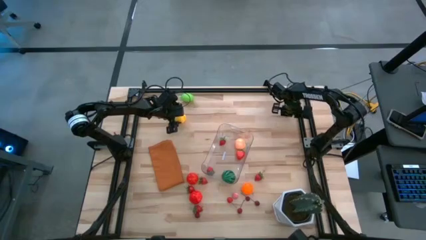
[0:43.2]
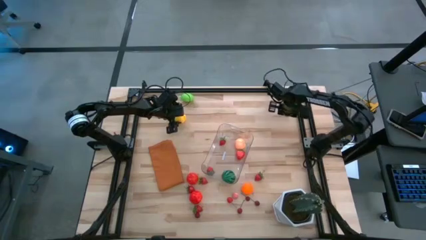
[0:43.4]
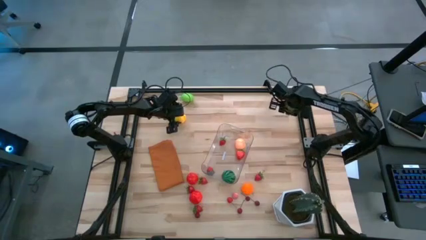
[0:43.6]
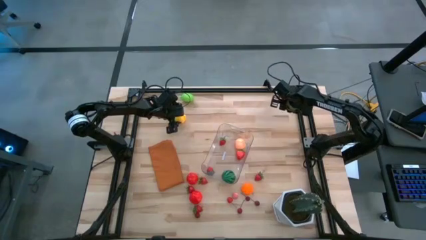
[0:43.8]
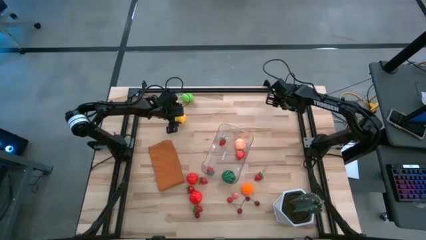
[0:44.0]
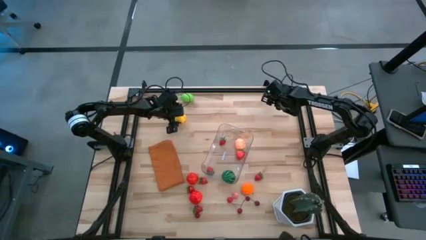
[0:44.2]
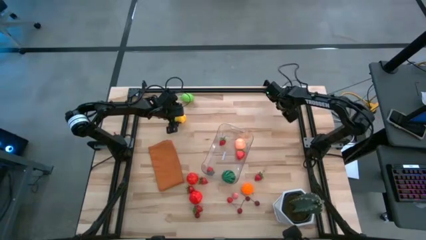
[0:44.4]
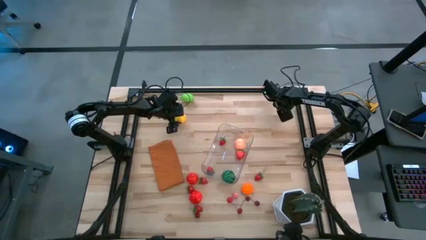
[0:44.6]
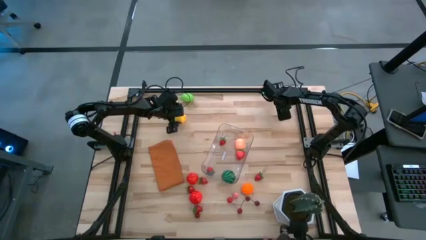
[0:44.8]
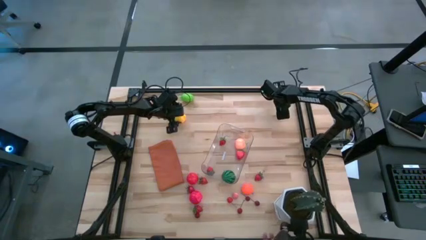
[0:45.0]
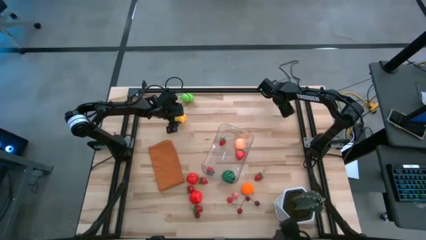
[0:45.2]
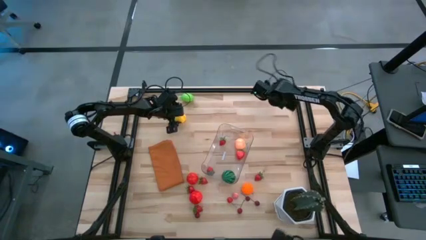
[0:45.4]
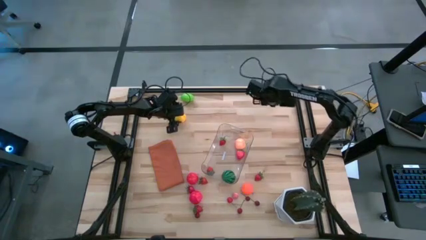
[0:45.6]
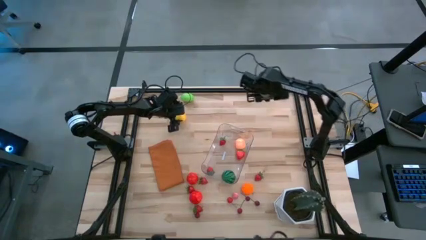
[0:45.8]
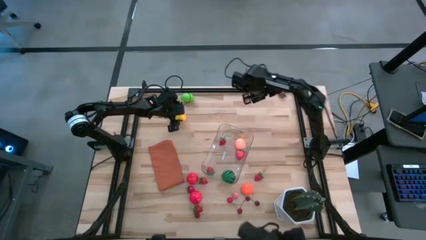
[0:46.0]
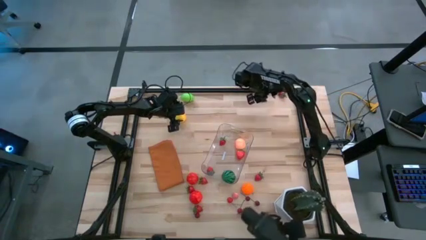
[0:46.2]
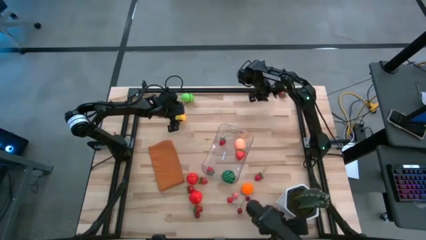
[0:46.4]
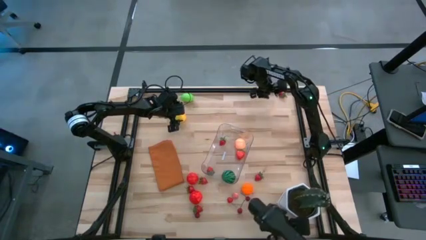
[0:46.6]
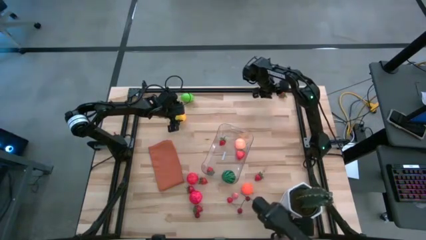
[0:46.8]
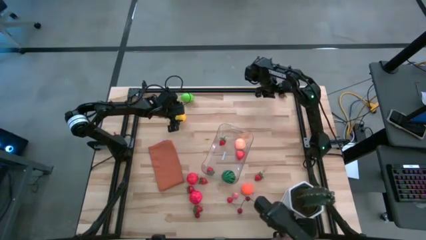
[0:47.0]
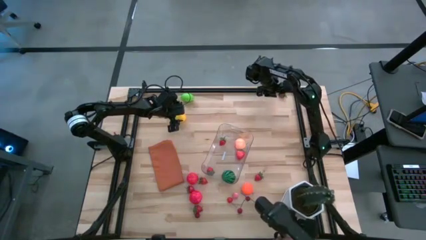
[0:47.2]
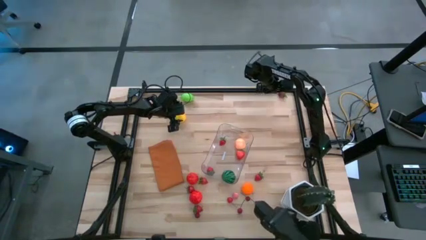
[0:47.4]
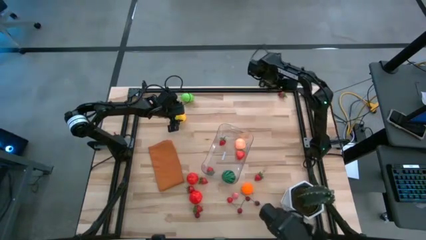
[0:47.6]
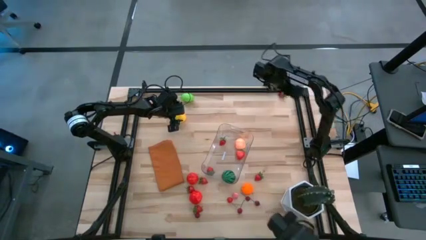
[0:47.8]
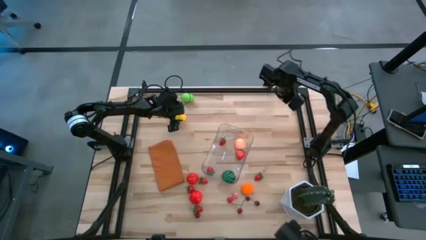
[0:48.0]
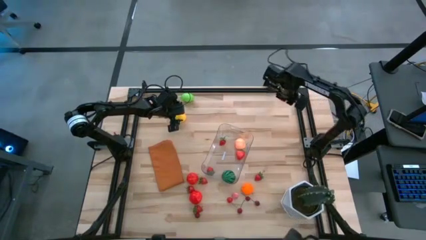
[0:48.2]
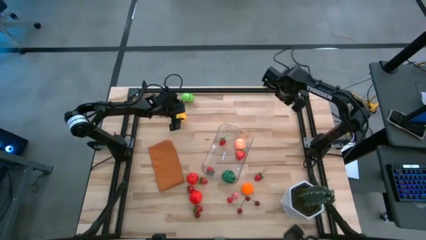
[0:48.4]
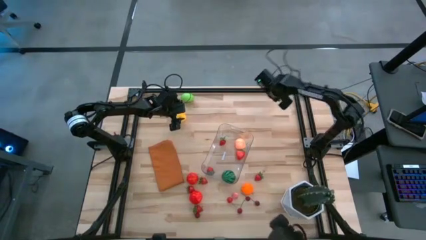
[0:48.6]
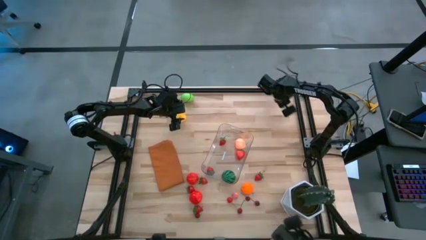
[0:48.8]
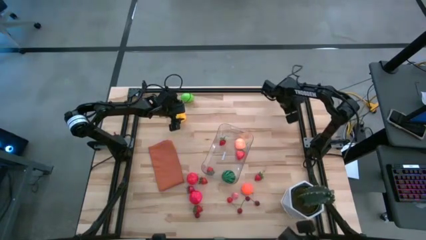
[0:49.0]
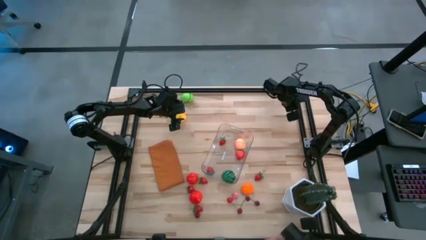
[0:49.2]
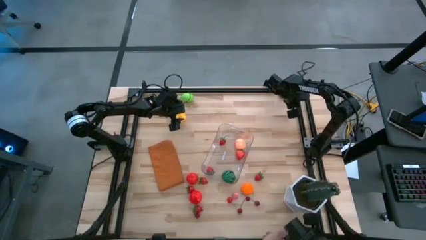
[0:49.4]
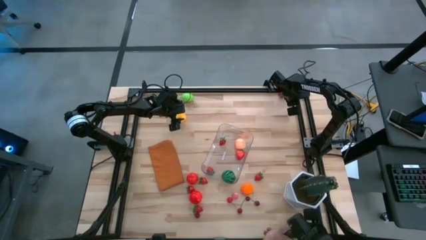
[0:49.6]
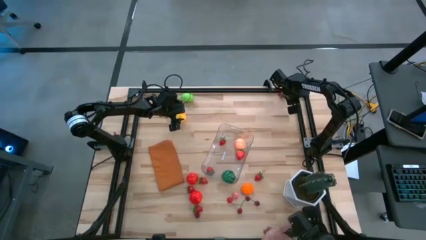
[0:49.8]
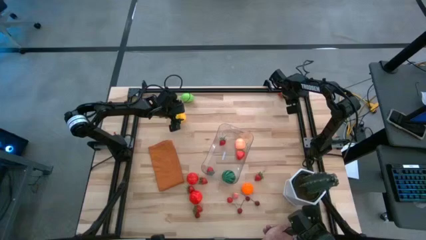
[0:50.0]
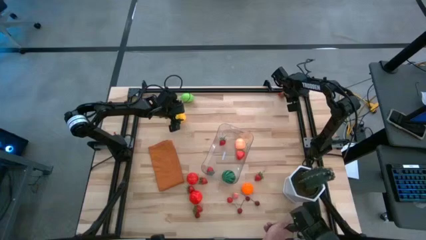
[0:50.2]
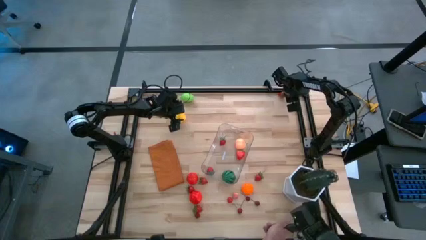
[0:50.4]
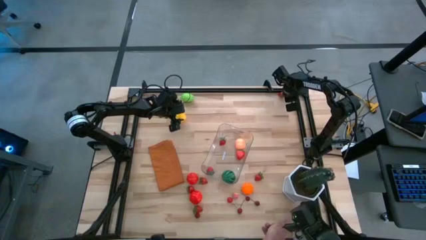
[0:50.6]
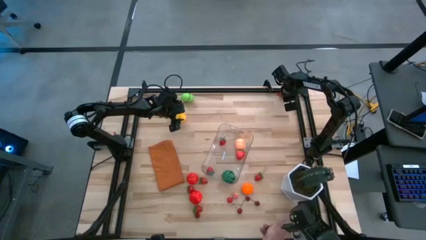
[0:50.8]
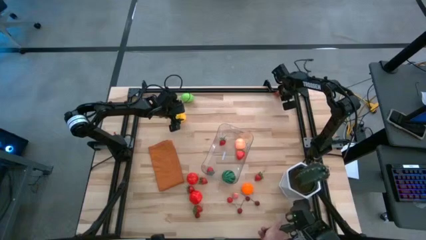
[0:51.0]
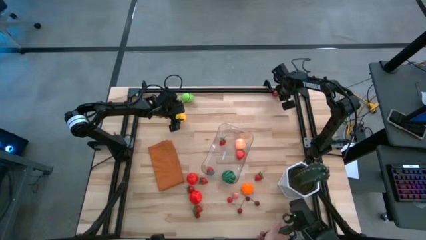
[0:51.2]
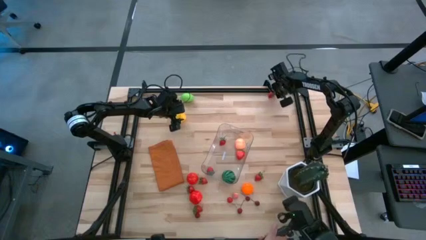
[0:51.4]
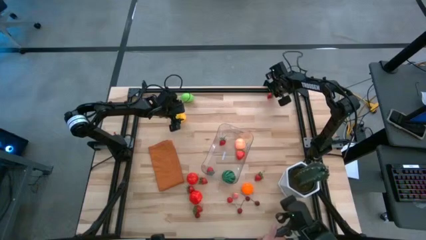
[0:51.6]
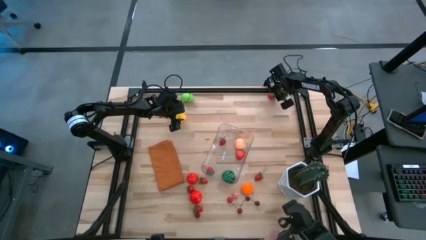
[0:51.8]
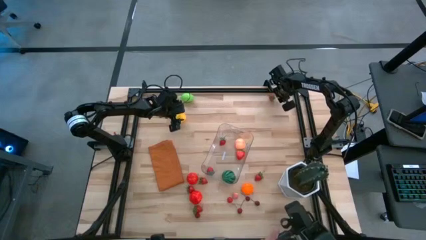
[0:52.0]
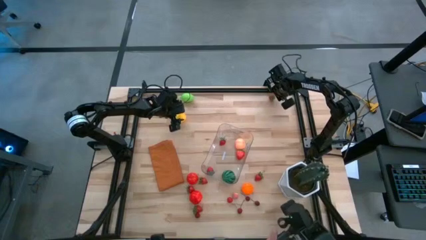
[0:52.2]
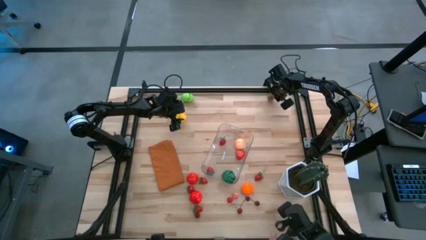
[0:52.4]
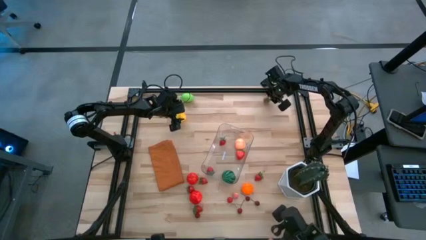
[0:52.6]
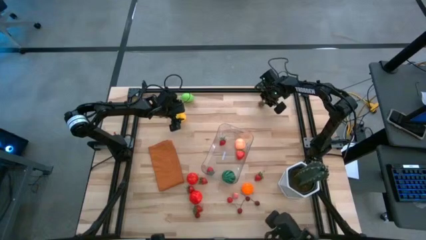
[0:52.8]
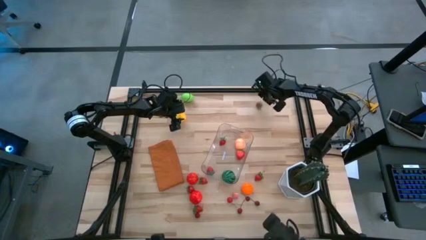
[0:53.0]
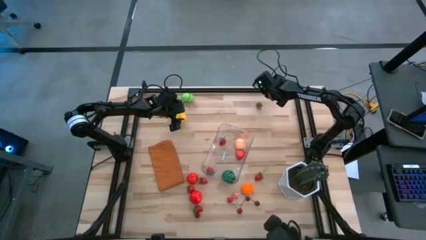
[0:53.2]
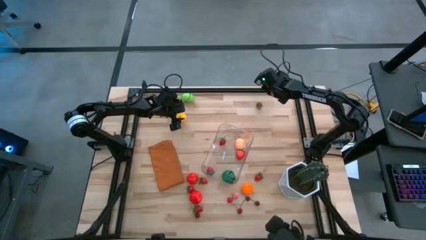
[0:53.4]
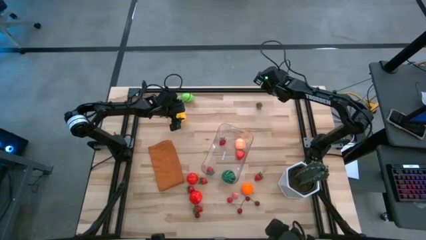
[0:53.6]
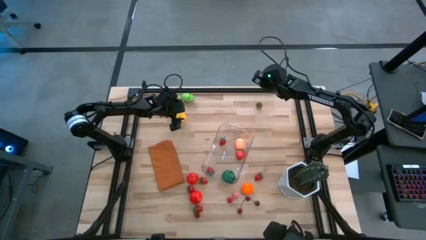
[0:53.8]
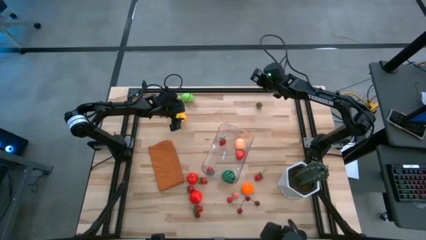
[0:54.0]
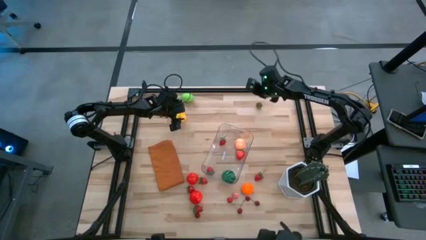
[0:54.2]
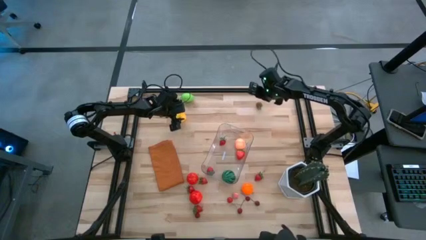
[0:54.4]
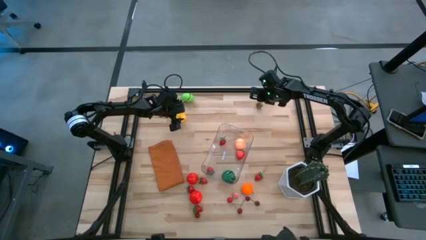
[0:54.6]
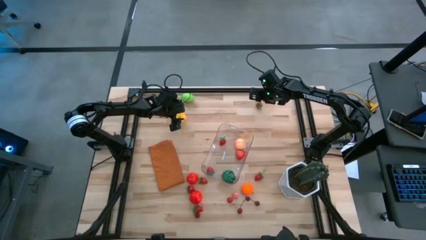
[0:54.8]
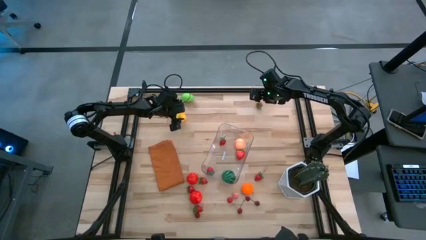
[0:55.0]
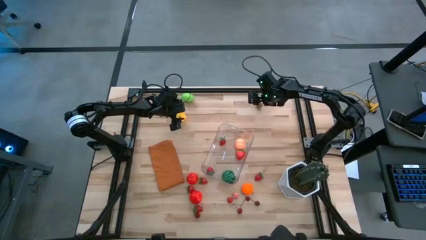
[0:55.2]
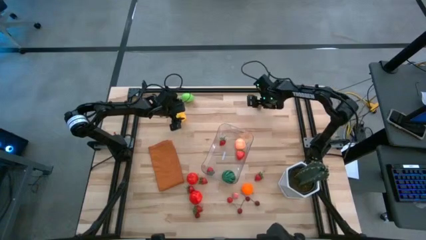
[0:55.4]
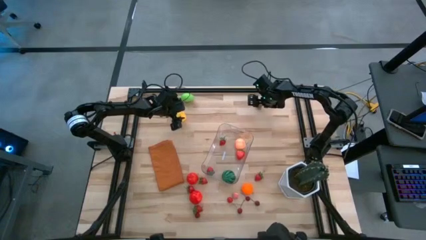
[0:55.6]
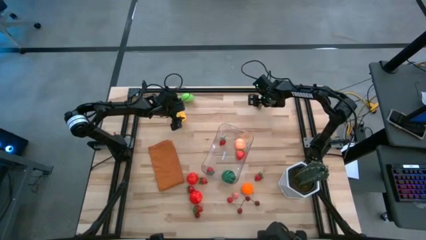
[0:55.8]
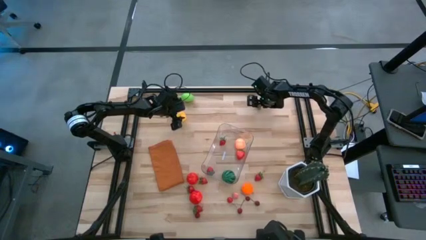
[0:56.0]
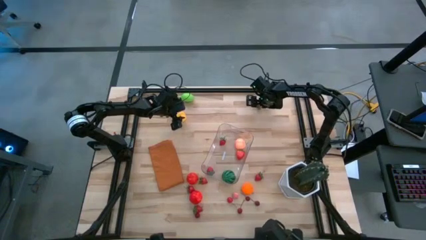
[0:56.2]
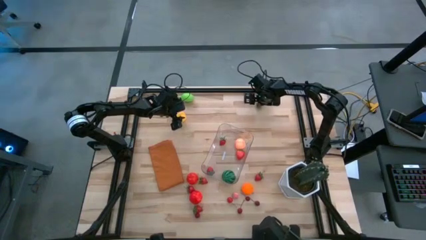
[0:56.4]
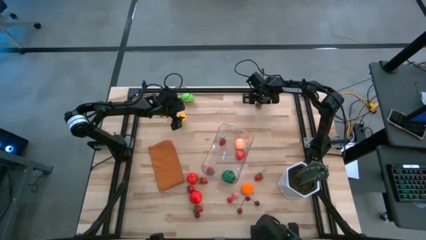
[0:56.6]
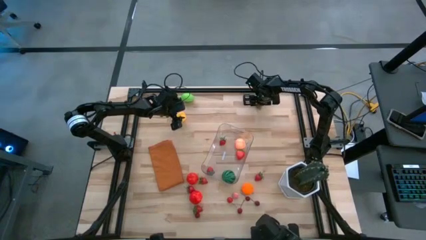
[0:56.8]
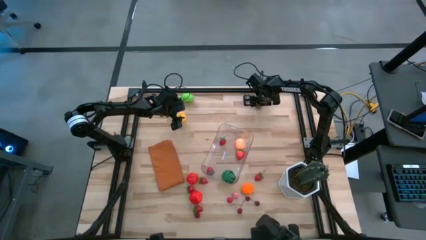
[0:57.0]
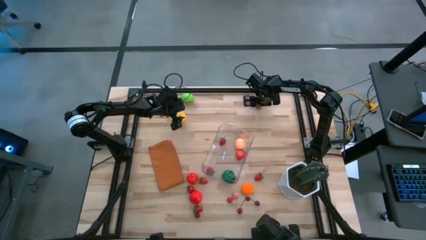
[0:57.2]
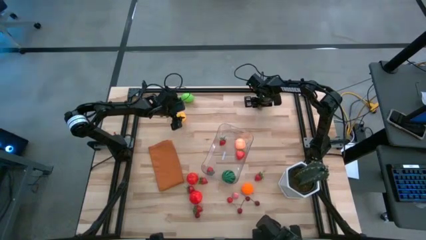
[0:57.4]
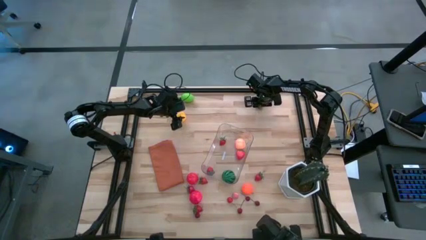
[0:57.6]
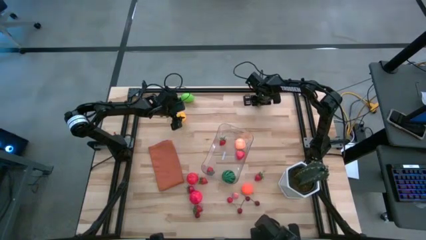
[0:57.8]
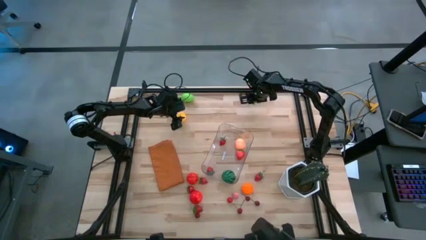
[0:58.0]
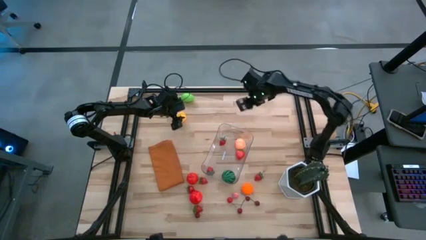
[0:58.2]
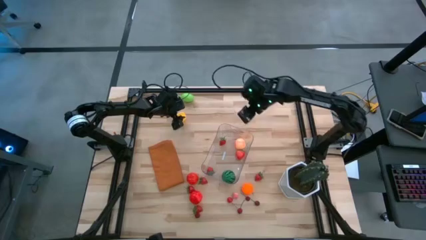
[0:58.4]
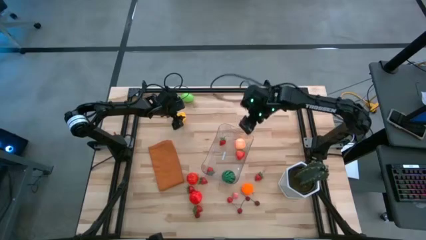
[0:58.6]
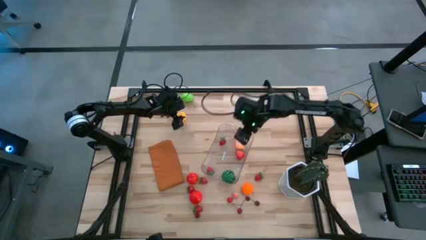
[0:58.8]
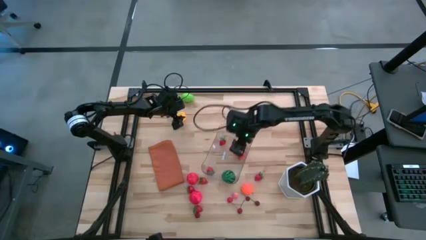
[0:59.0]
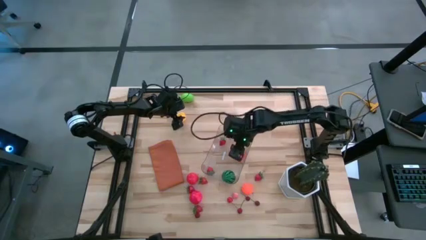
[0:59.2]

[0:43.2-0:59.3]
Task: Pick and placing Produce into tupperware
Put the red strawberry into the transparent bin
